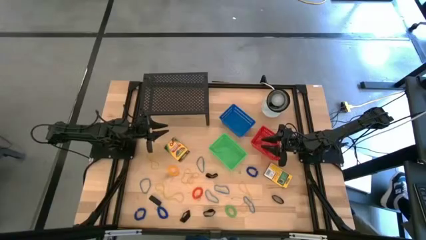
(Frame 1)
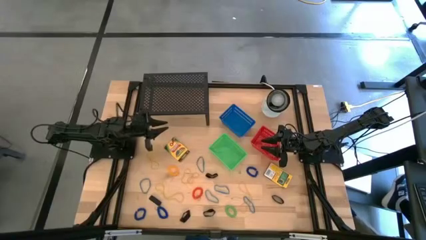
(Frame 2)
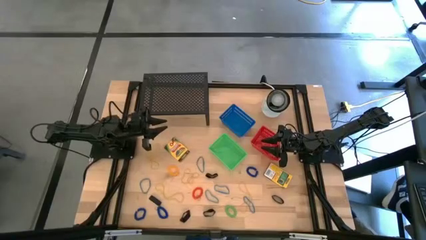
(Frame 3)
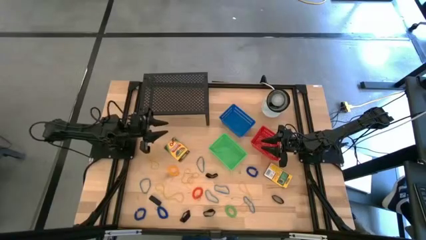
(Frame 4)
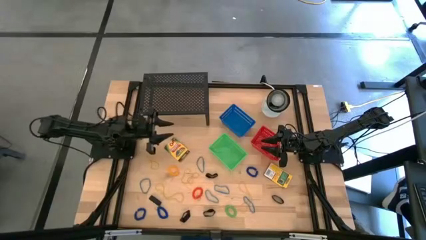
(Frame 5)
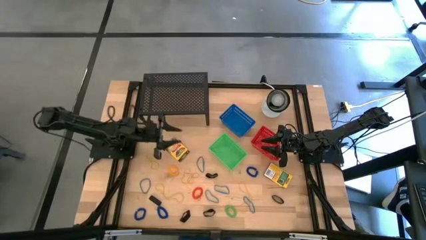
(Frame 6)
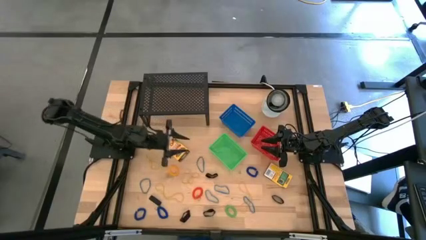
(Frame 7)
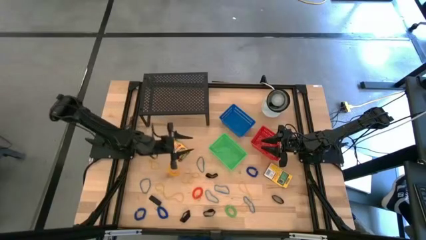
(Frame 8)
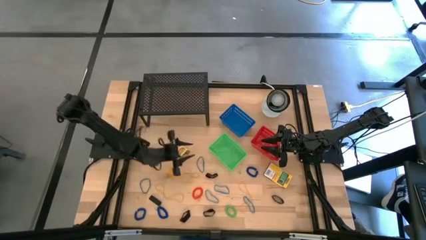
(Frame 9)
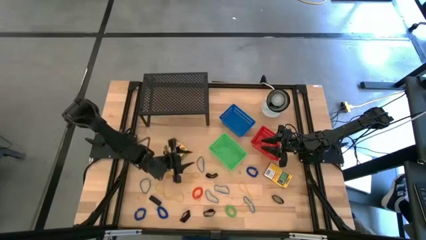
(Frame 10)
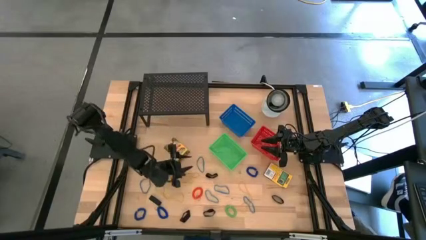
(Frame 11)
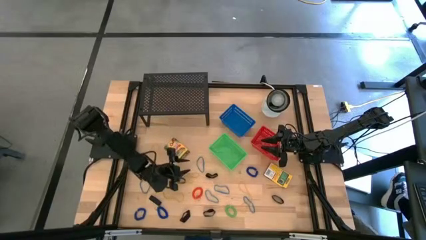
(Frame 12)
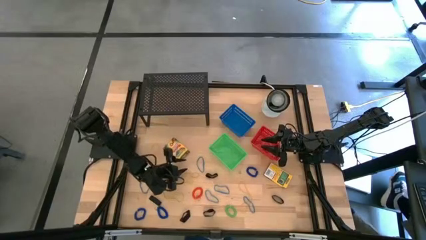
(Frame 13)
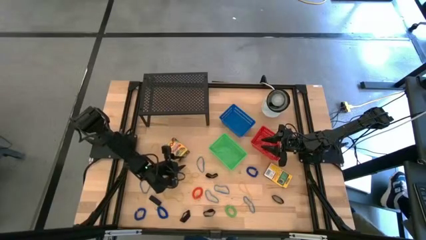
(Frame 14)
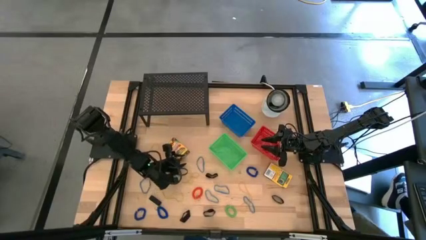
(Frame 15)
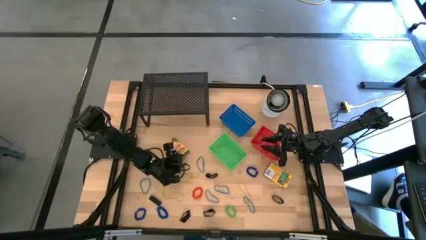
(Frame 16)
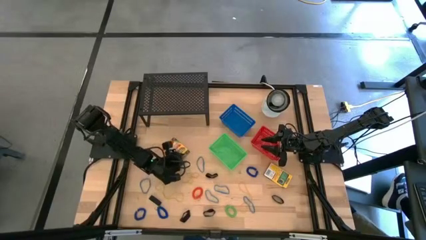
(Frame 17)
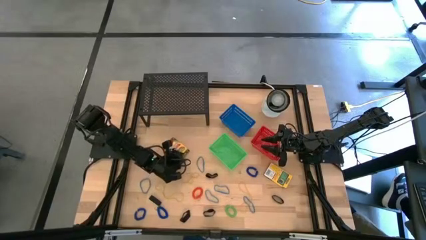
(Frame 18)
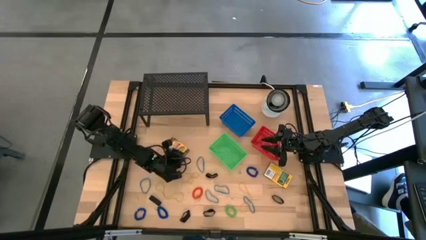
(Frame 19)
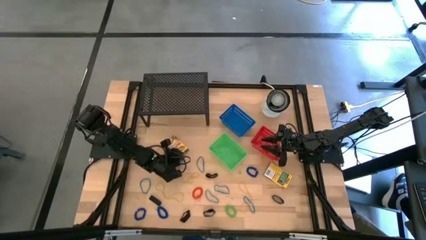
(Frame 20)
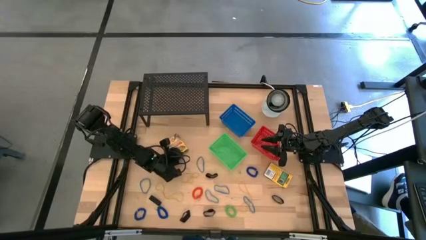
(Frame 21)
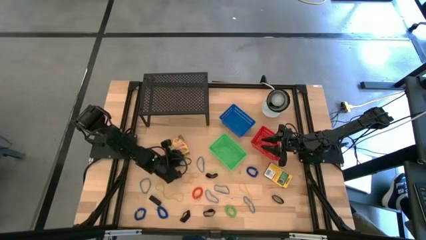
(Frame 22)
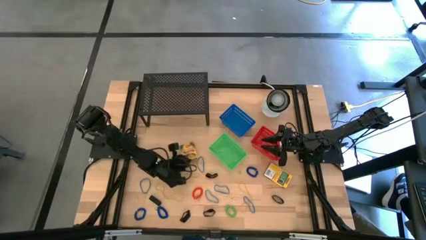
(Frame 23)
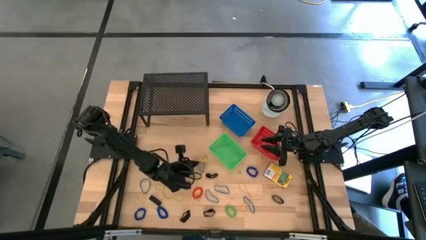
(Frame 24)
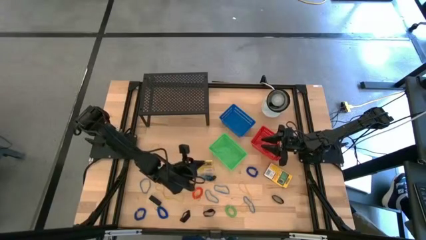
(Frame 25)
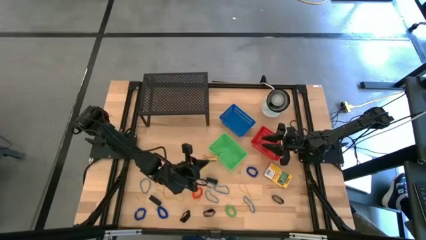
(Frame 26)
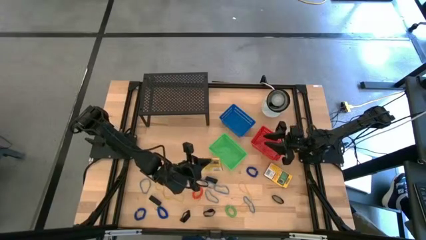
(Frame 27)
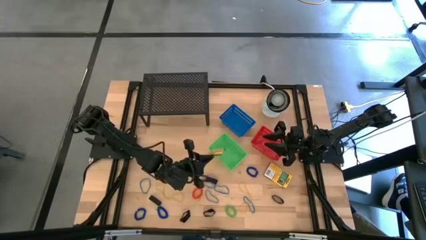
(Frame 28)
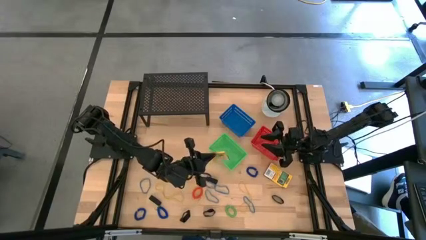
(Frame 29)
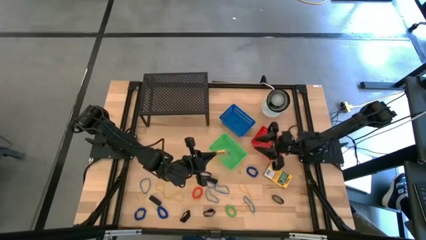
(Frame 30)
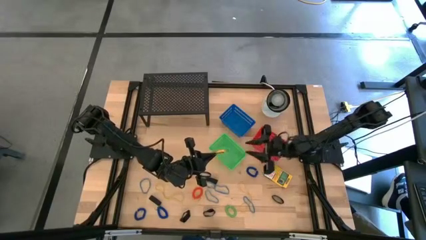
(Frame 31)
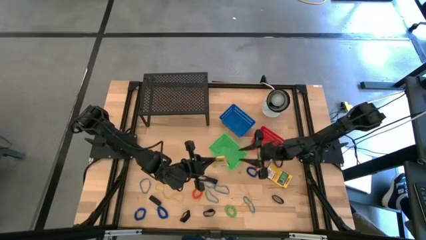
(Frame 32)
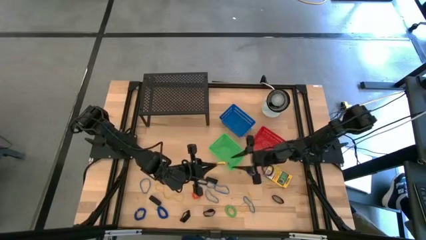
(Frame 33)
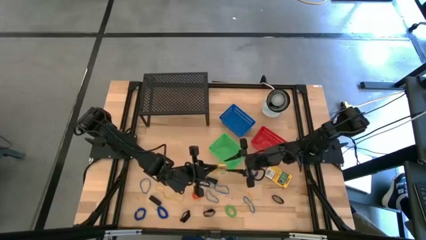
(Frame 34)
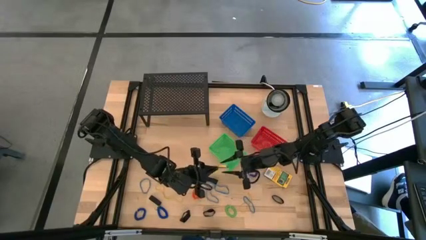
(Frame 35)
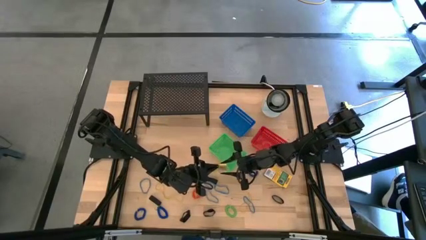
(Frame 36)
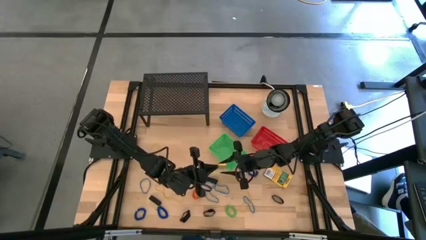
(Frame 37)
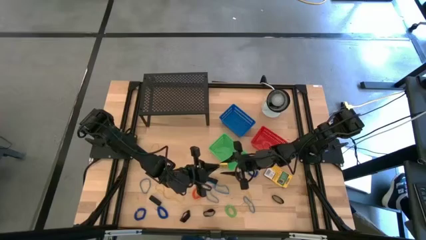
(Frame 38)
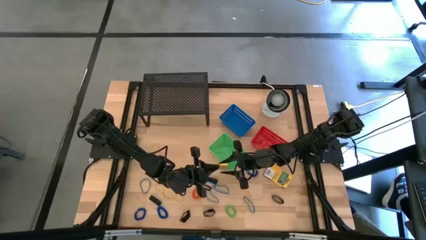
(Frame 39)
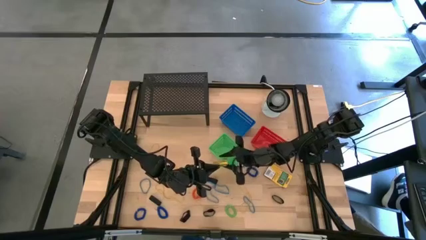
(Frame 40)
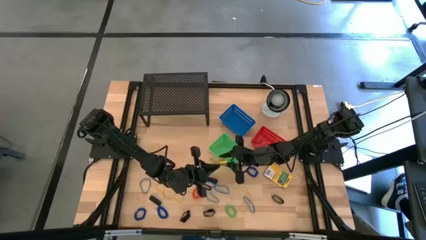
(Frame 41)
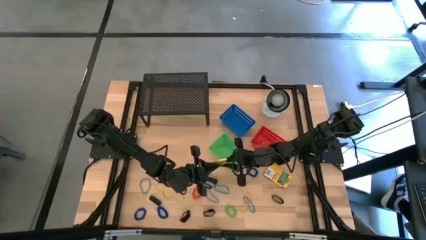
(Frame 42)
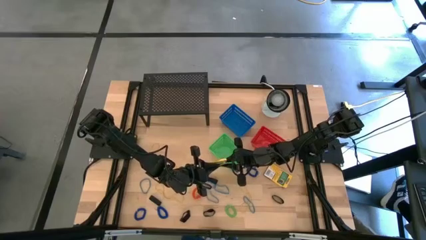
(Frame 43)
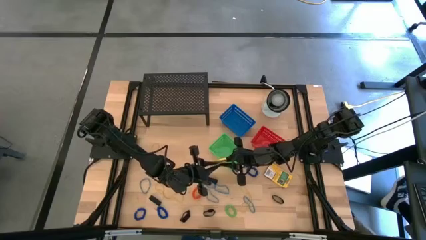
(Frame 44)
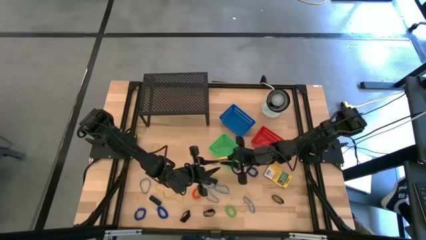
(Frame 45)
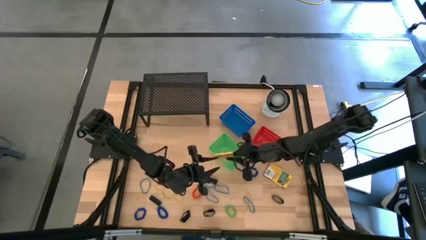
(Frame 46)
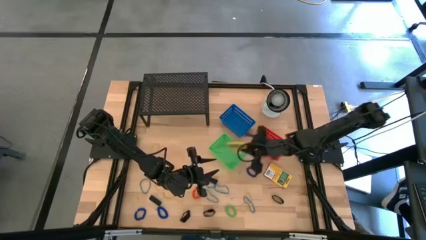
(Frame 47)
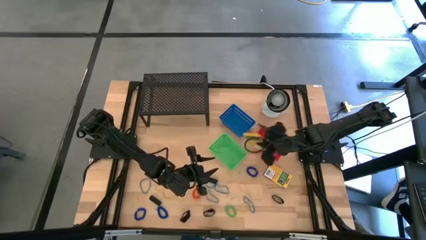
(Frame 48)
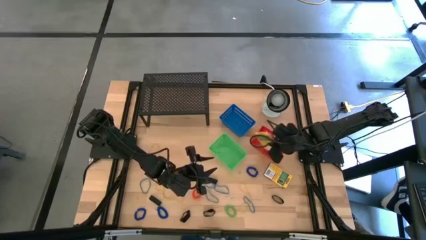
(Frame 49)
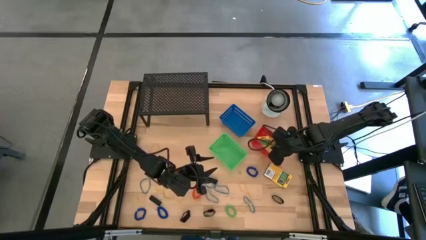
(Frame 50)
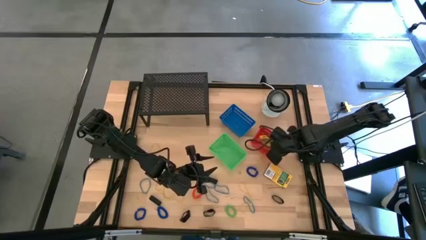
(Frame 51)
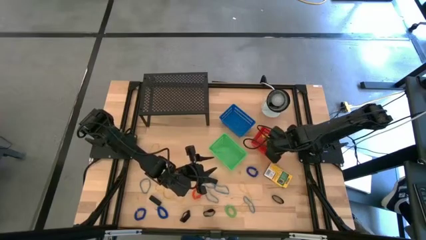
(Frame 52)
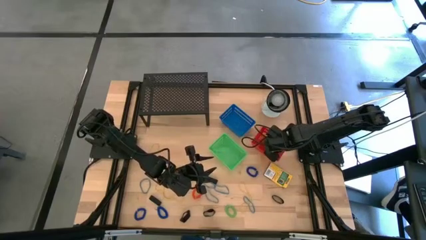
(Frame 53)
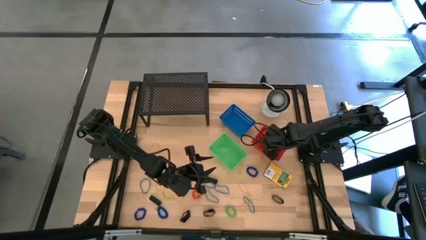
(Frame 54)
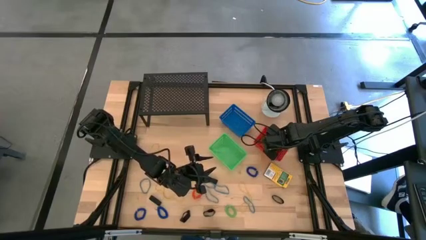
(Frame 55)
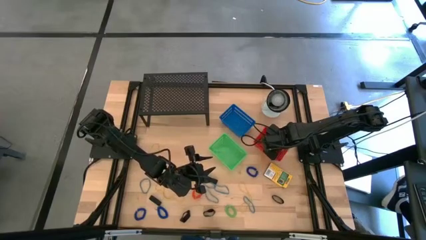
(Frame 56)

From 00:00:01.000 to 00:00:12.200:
Task: Pick & Place Office Desk Supplies
Put the crayon box into the red basket
